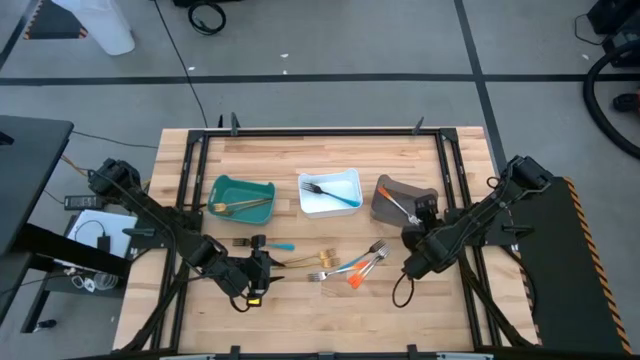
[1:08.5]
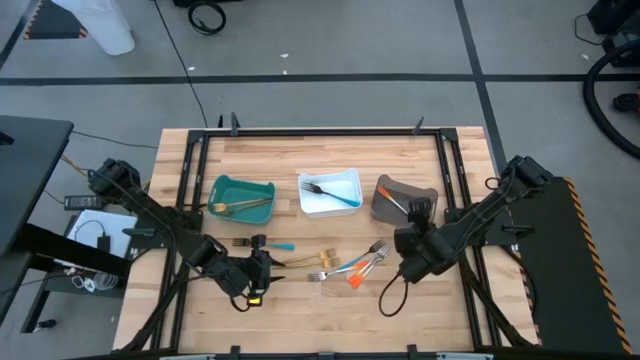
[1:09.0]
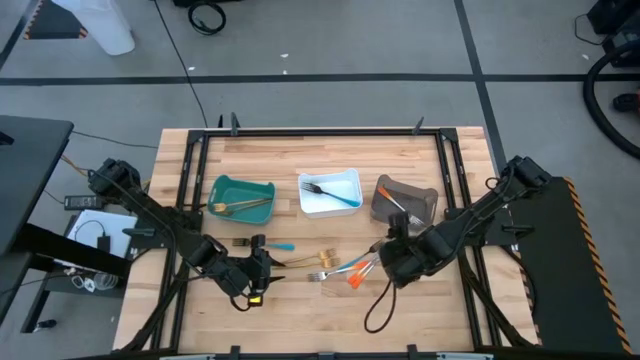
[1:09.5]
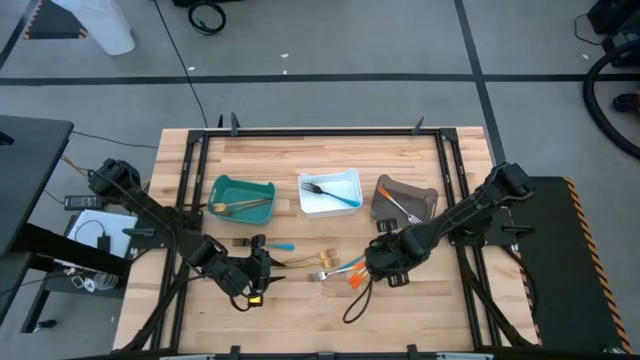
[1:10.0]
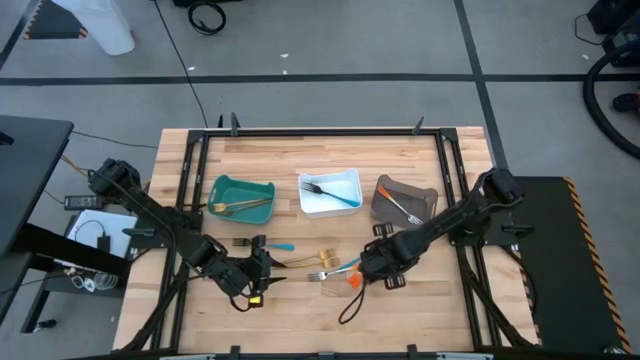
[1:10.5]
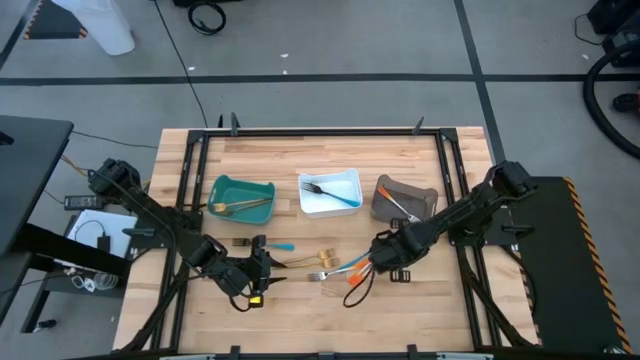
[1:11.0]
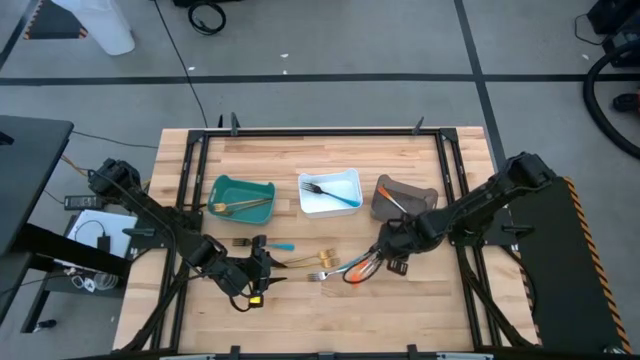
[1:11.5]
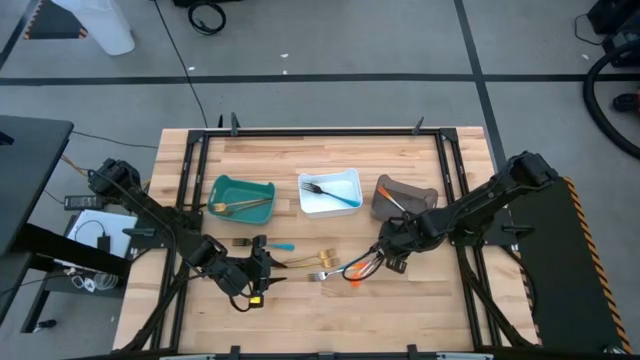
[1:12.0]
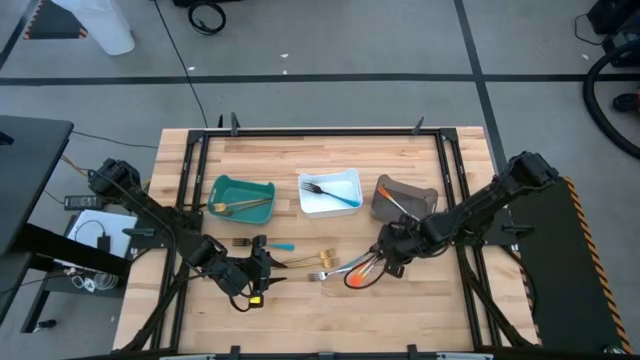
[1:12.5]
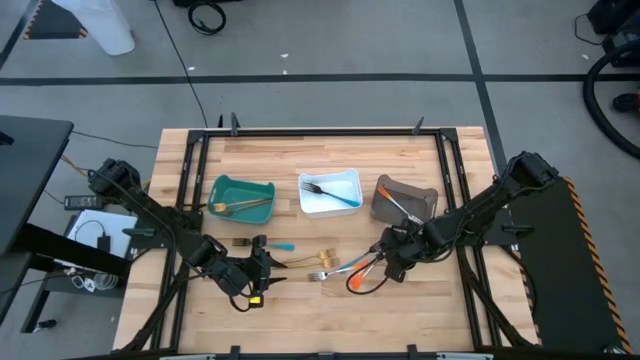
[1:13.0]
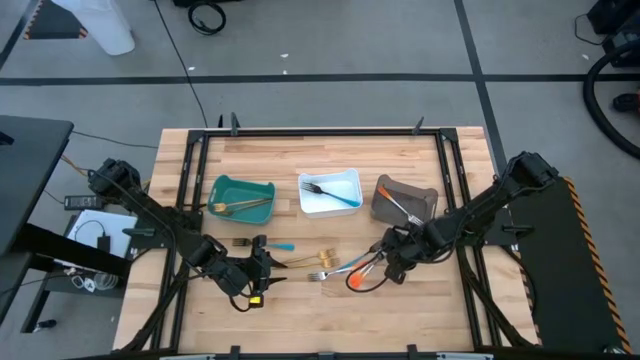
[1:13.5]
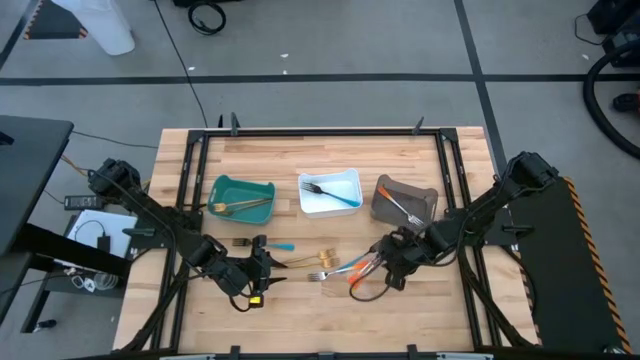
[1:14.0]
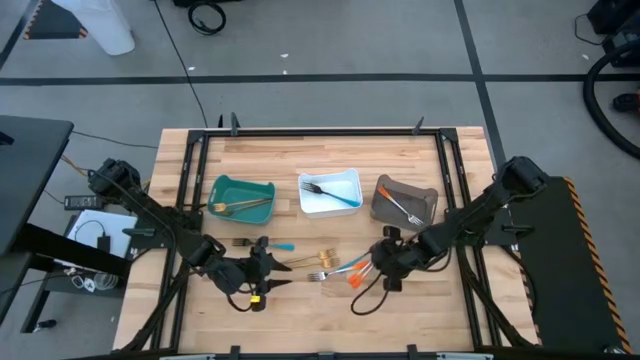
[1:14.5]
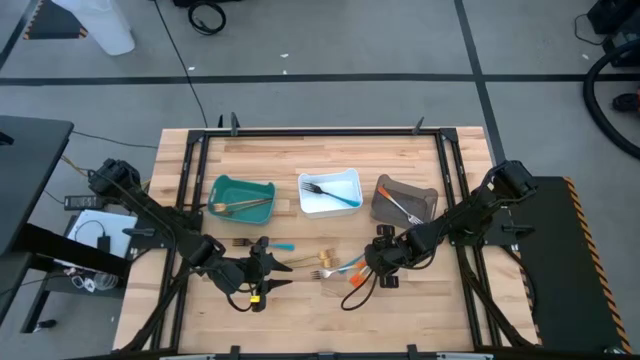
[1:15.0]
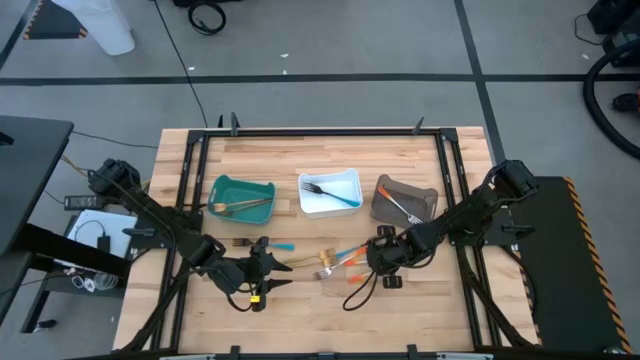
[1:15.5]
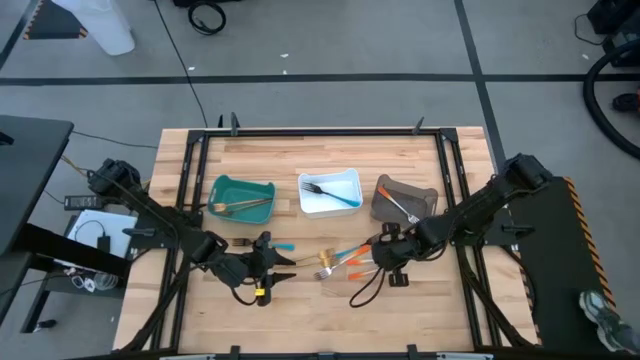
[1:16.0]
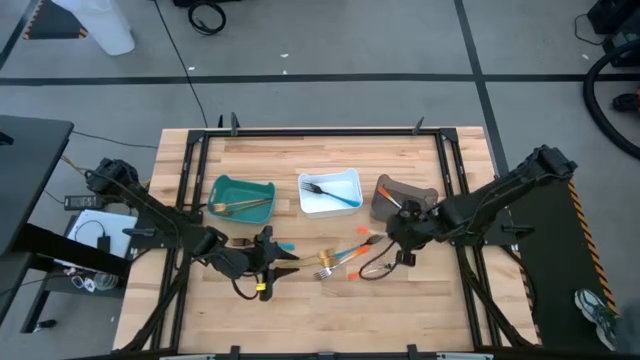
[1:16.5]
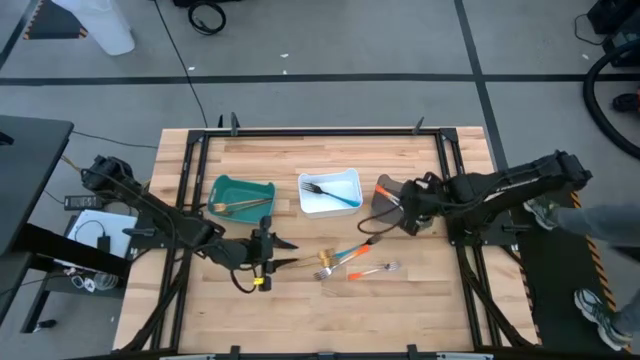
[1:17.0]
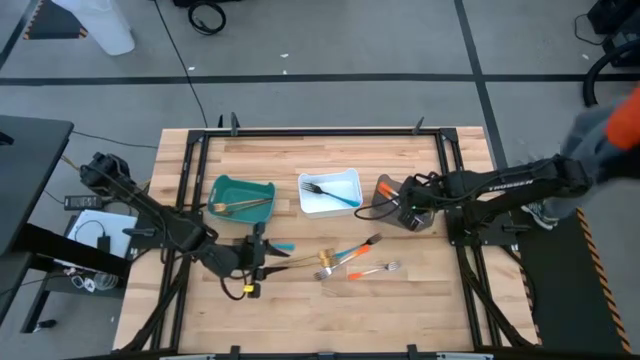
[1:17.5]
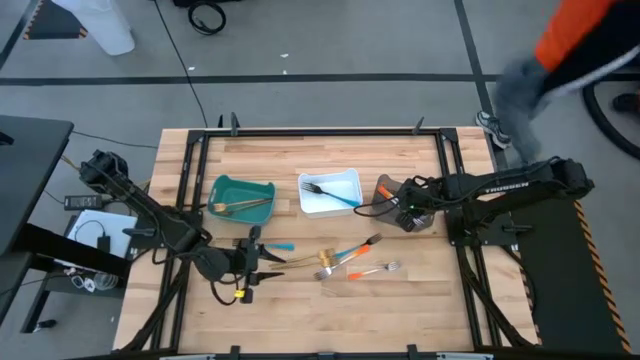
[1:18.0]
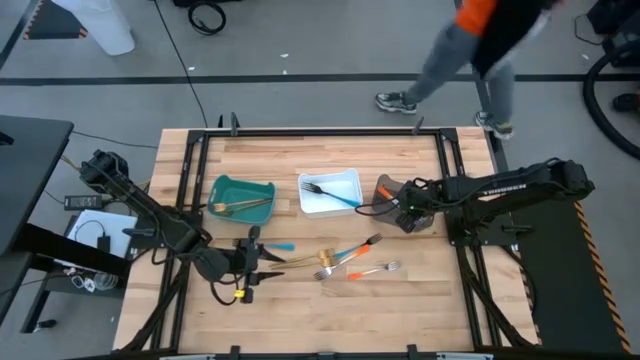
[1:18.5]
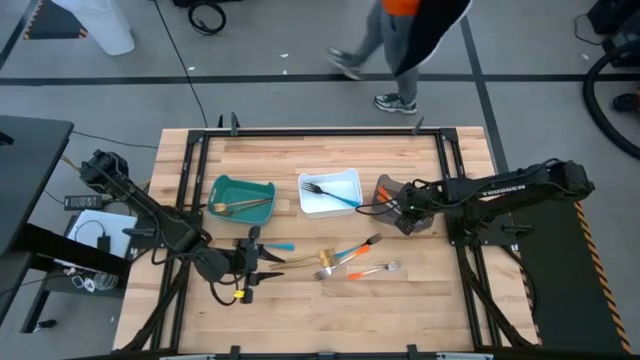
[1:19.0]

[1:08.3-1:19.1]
Task: Sort silverware by color (type)
Put the orange fork into the black bin

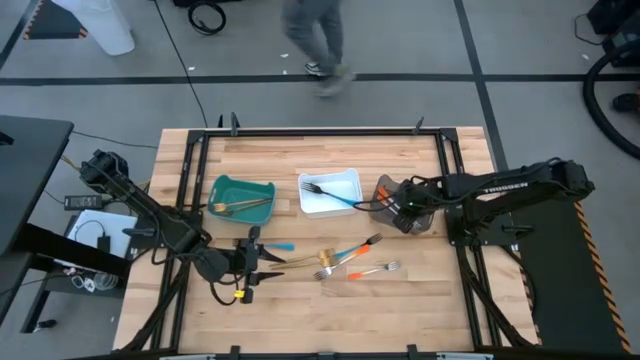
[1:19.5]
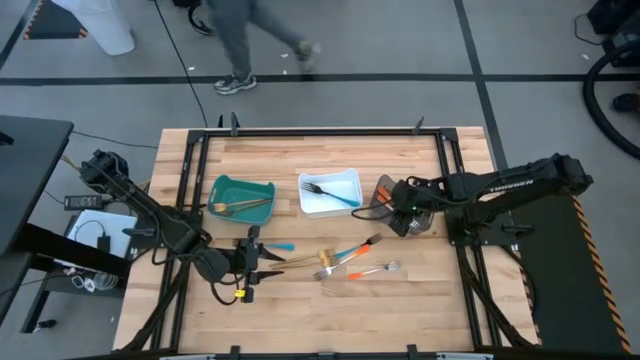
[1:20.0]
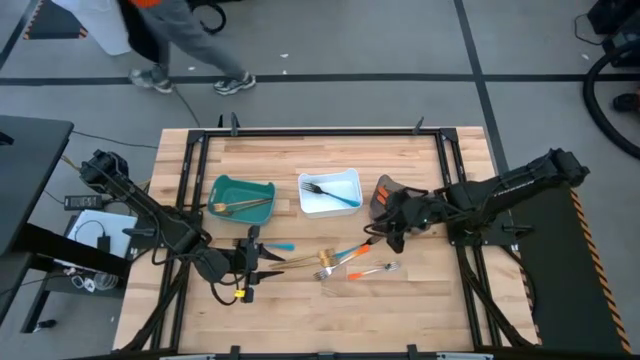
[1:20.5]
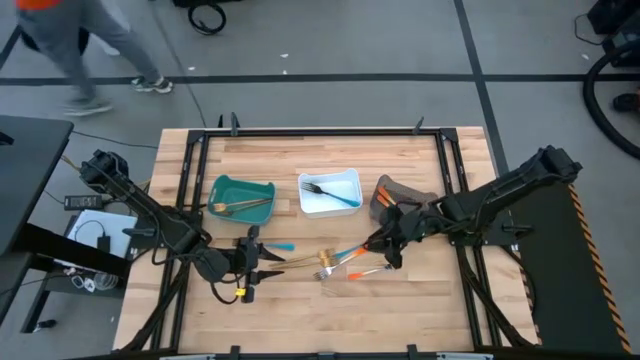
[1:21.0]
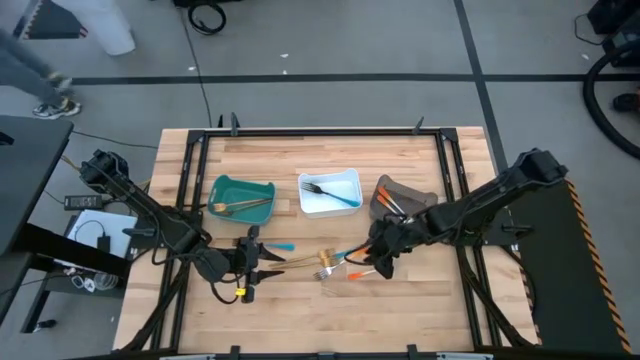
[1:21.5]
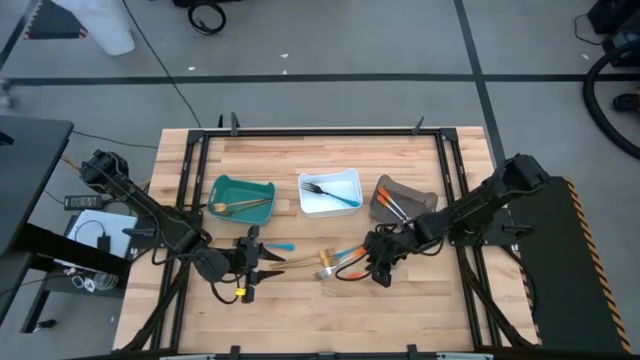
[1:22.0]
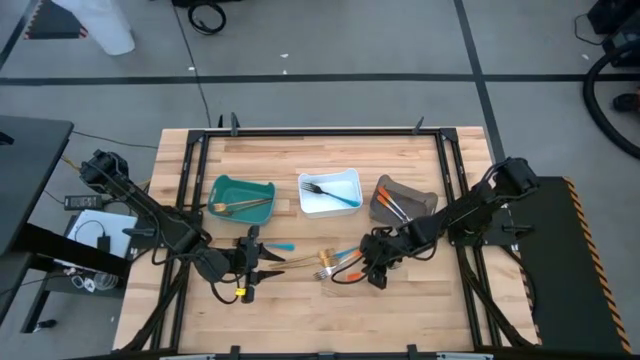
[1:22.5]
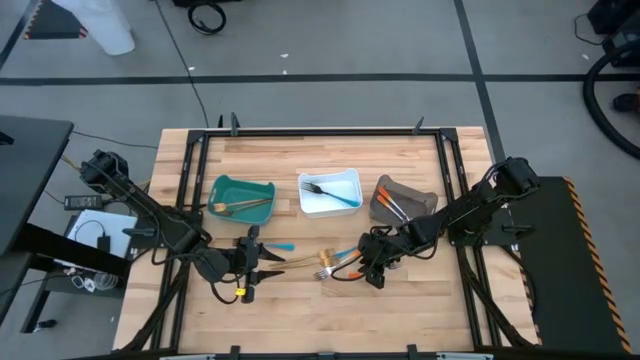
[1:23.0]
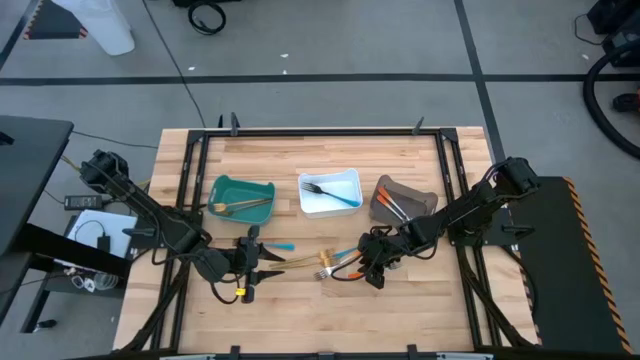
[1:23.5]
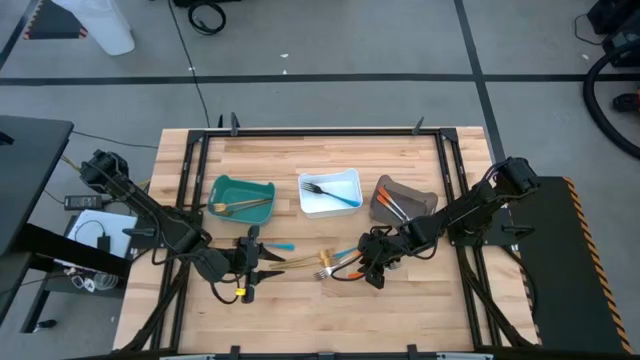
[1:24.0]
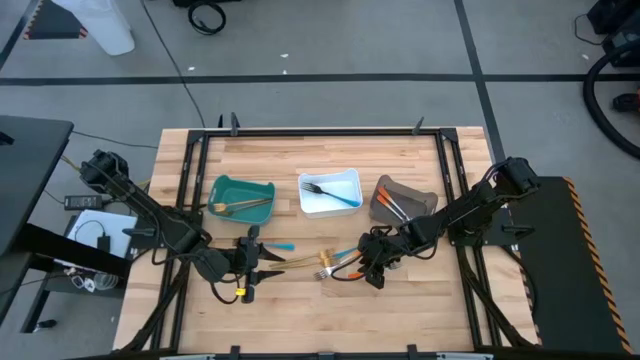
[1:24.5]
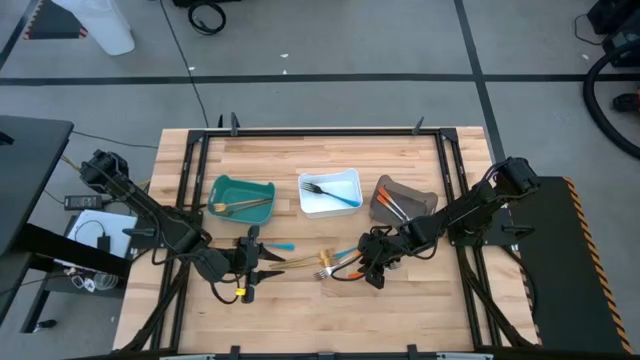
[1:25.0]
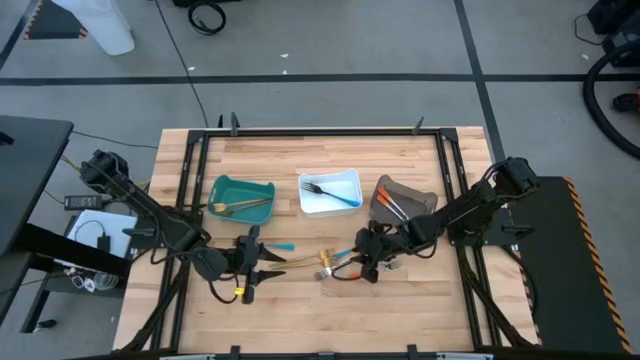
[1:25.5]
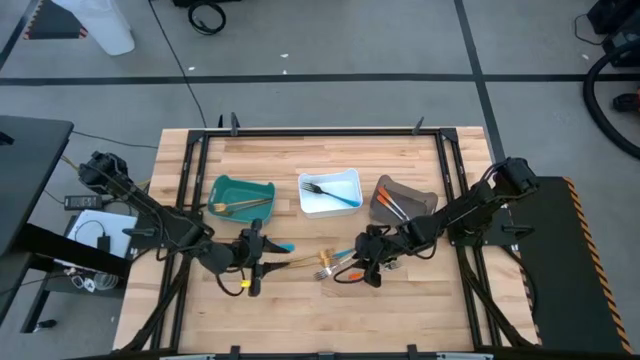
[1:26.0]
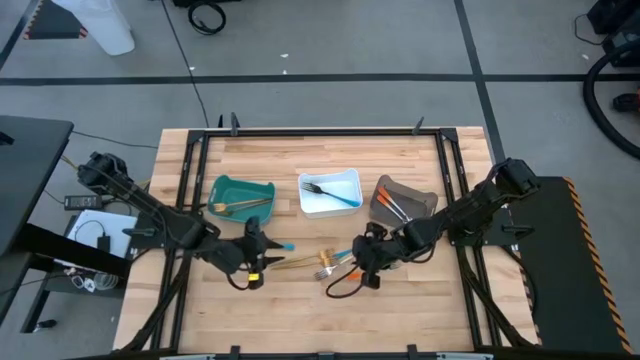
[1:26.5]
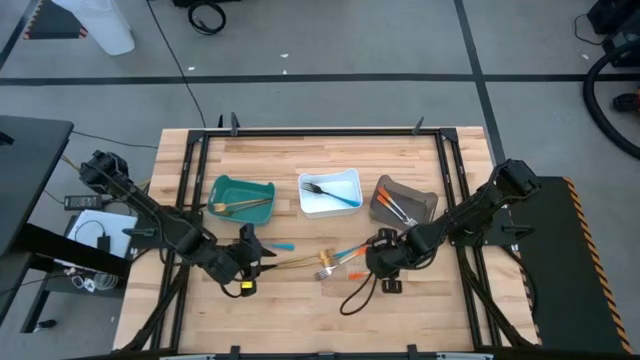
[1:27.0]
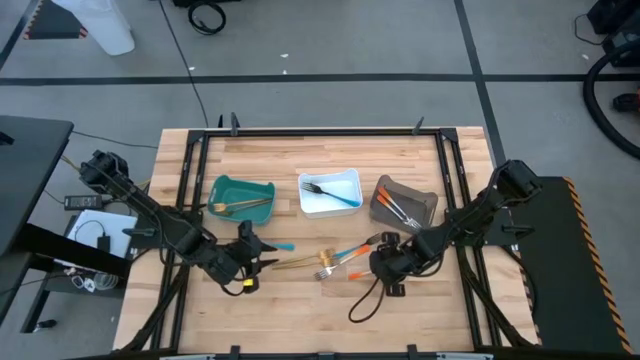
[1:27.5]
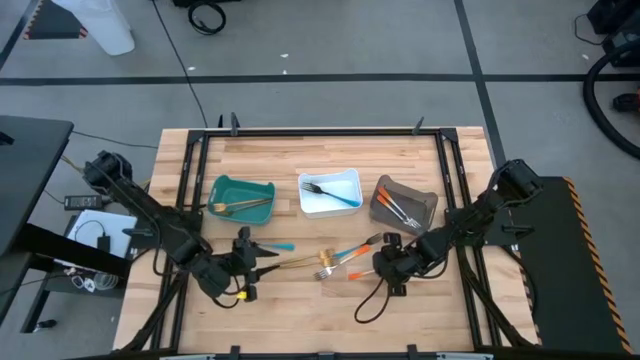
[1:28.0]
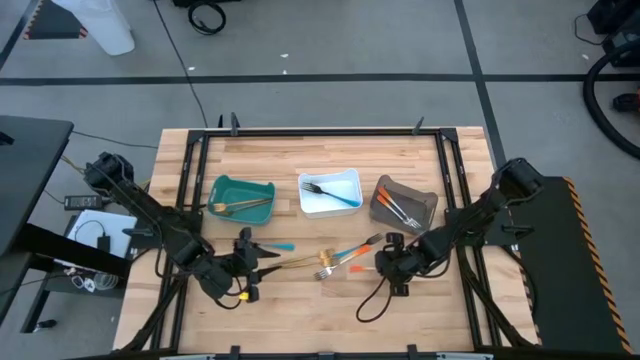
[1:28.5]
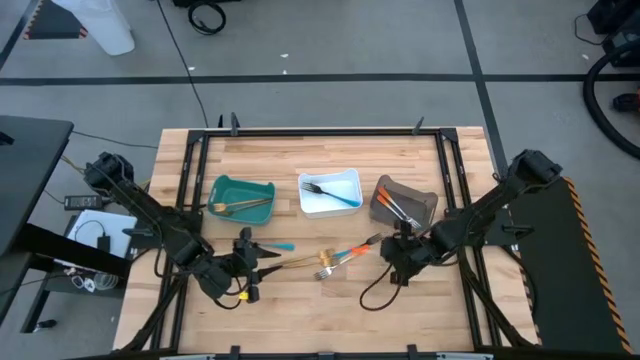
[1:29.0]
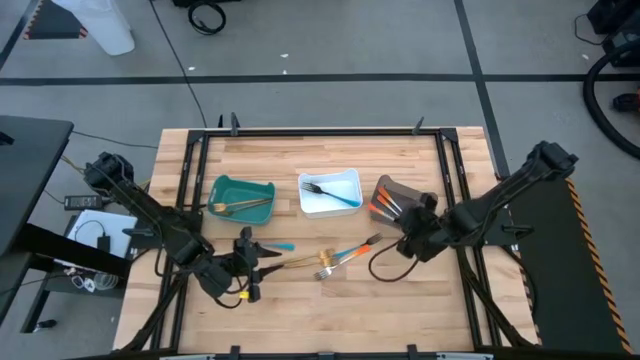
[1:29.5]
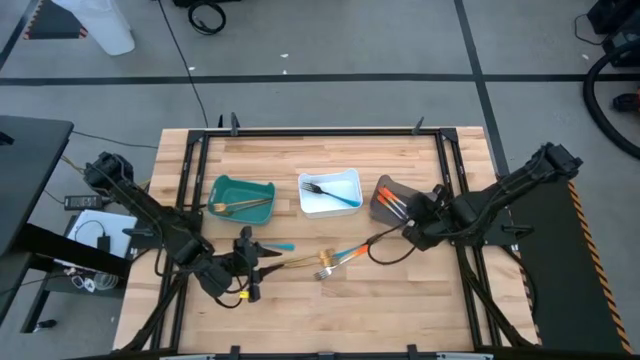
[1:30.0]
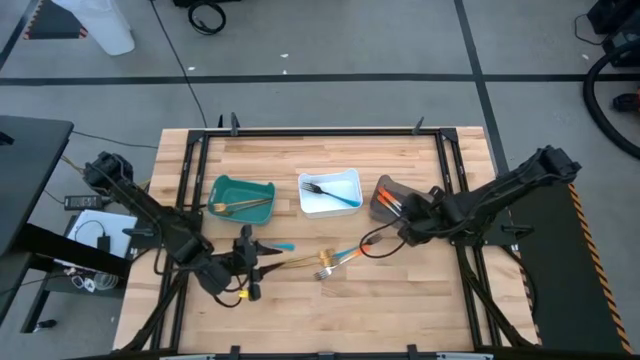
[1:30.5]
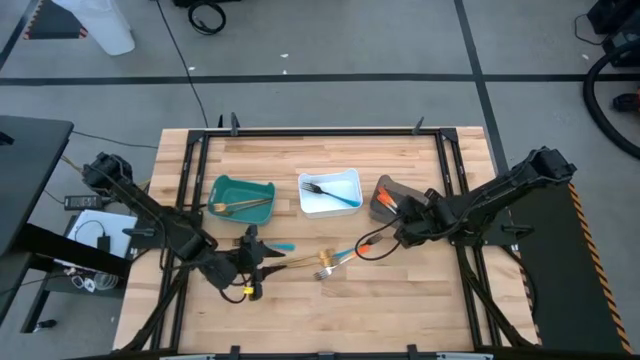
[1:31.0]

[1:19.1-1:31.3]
Put the orange fork into the black bin
